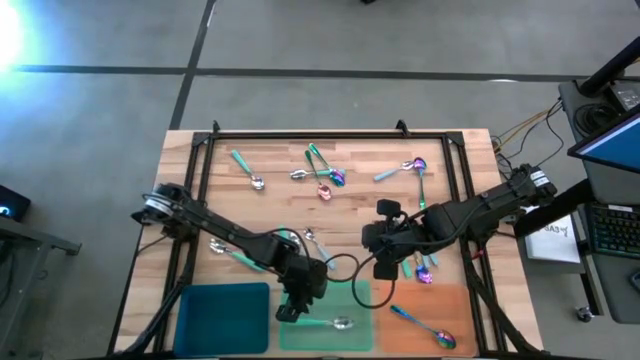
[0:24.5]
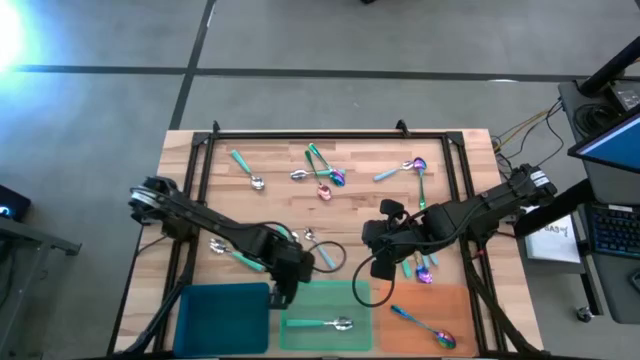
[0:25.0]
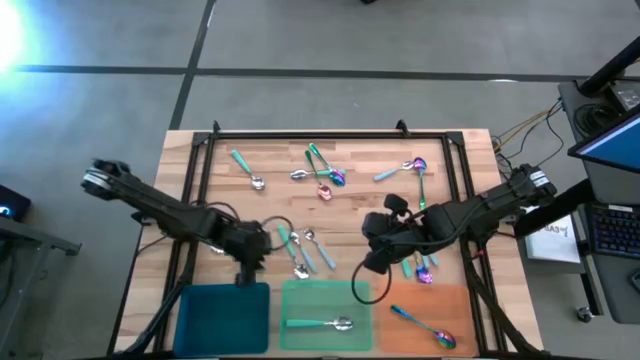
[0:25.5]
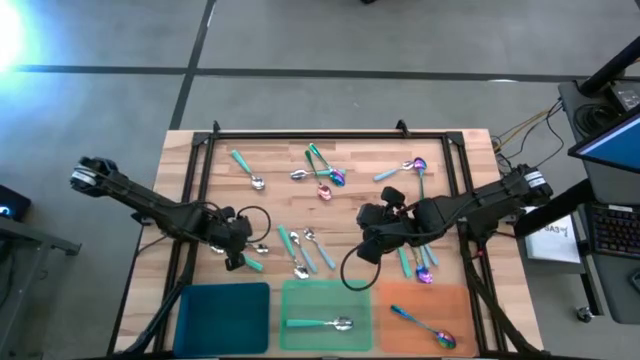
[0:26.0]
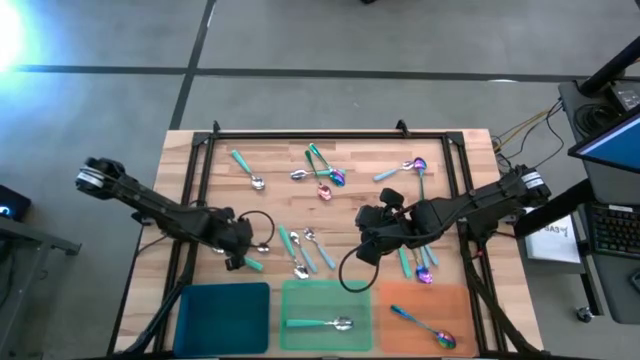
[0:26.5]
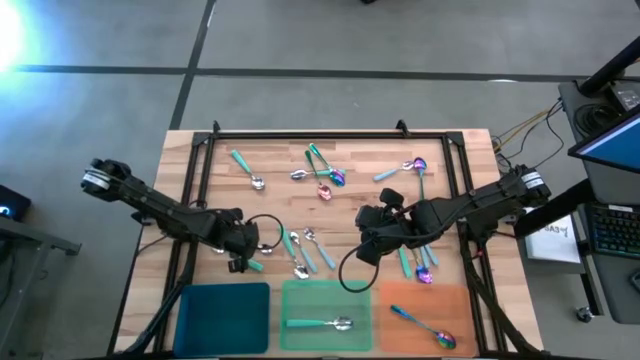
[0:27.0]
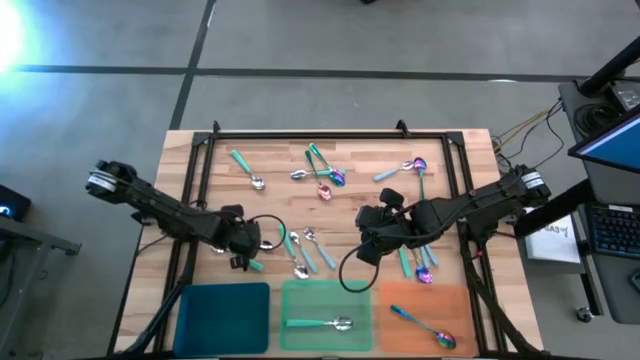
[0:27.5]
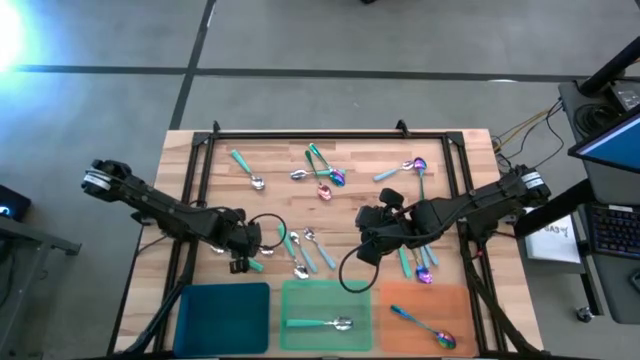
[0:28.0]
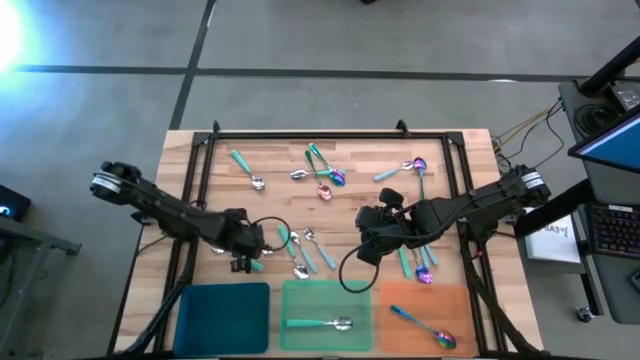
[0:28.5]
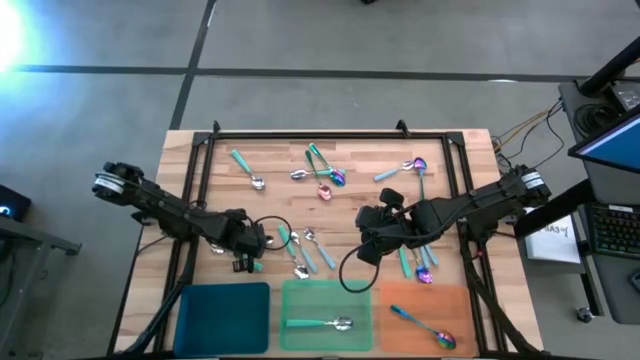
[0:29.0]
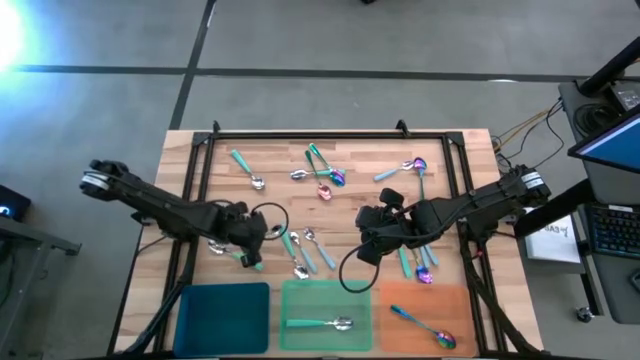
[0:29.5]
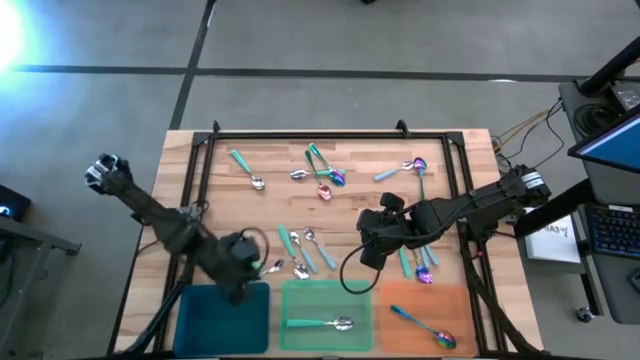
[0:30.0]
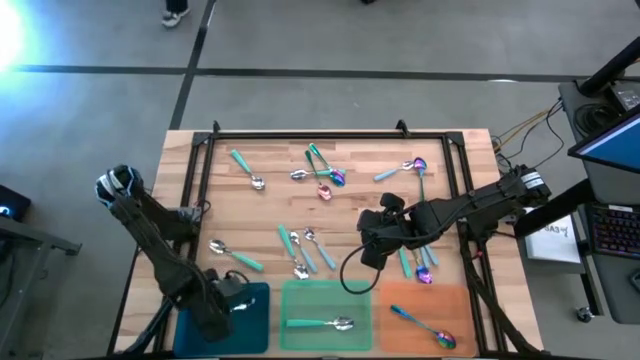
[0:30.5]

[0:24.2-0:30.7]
Task: Sort silverware by color (type)
Put the light blue spoon into the blue bin

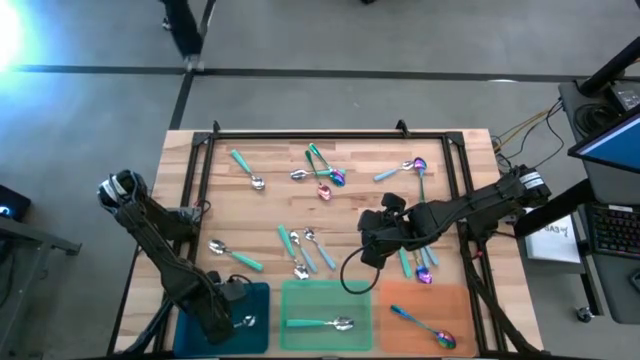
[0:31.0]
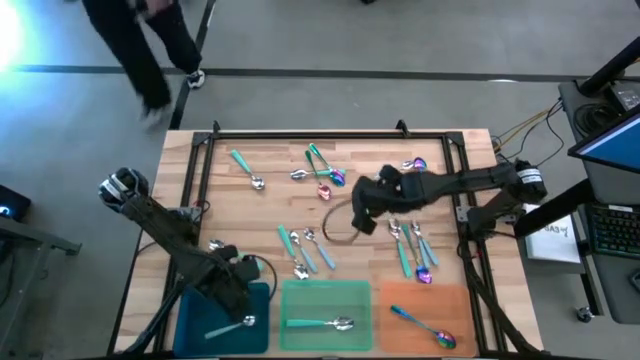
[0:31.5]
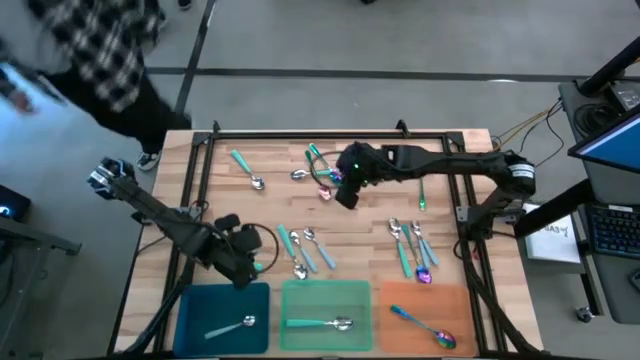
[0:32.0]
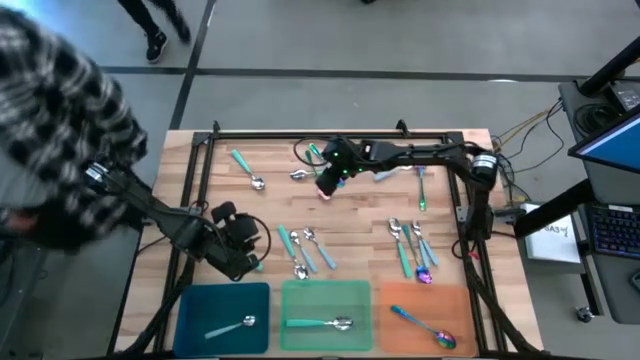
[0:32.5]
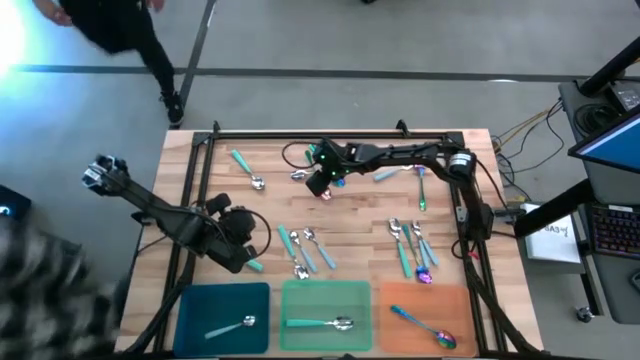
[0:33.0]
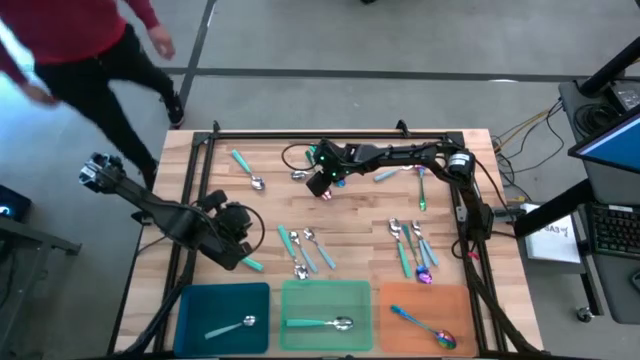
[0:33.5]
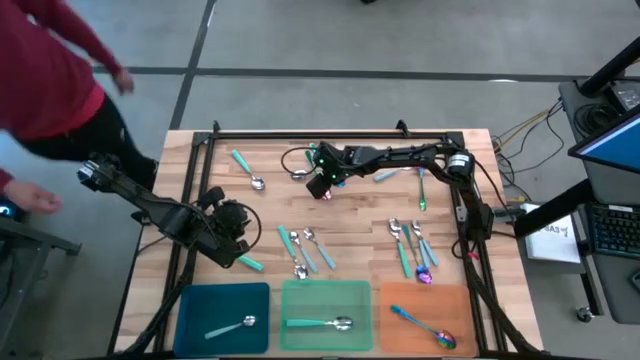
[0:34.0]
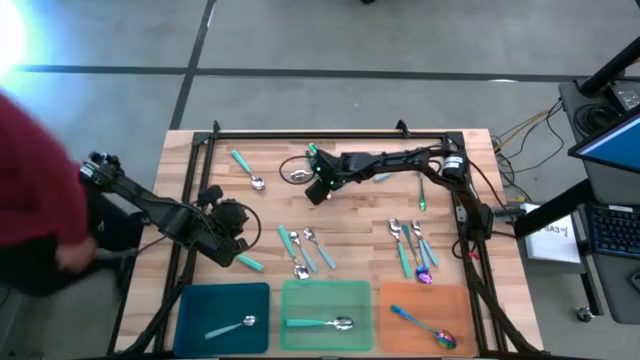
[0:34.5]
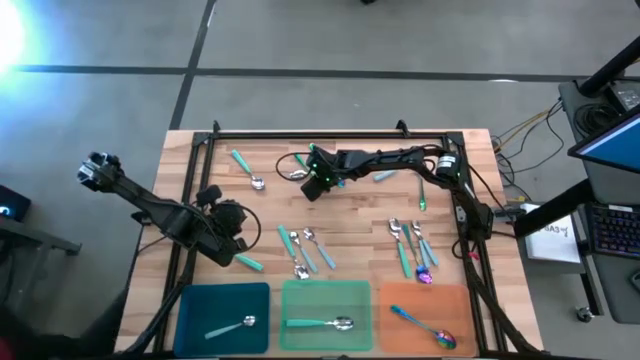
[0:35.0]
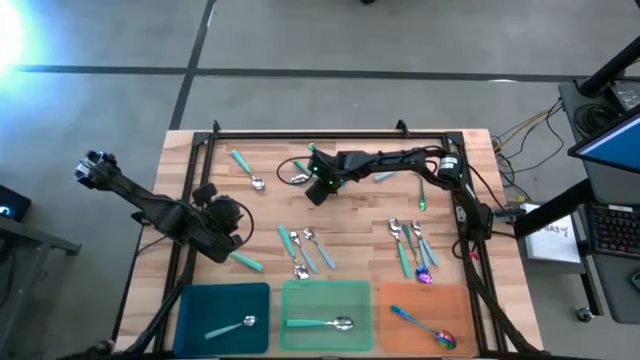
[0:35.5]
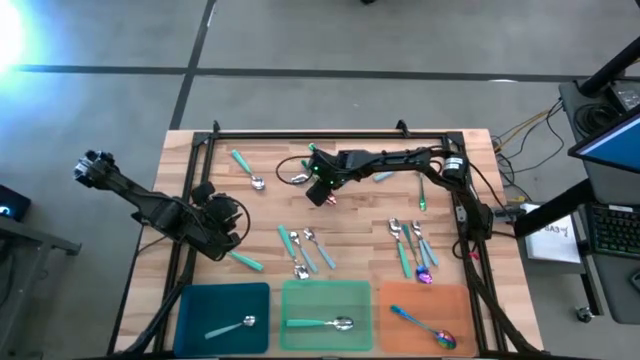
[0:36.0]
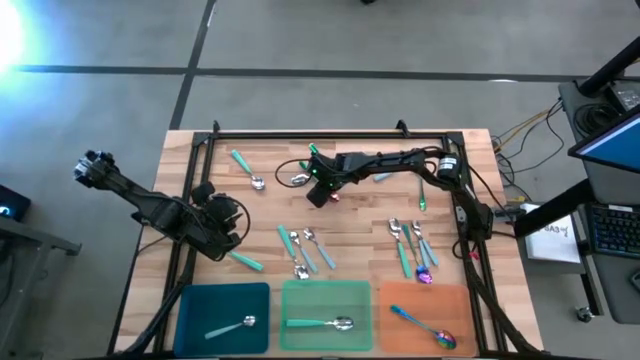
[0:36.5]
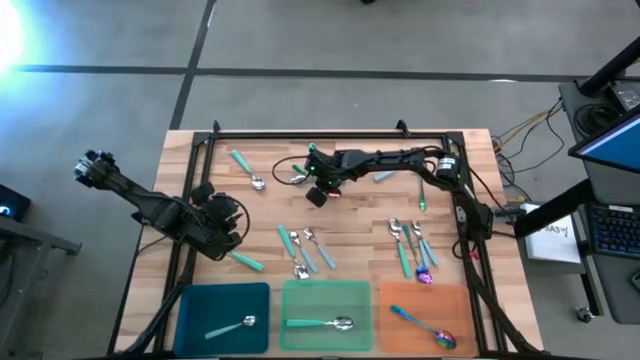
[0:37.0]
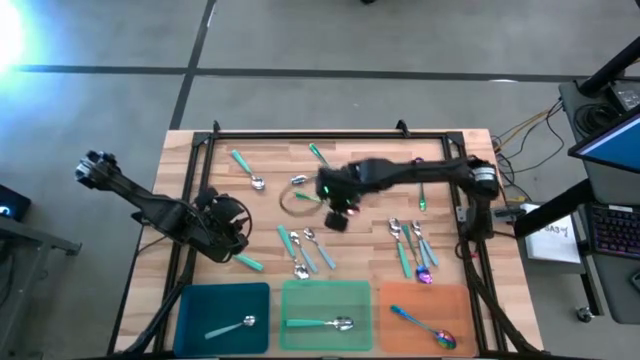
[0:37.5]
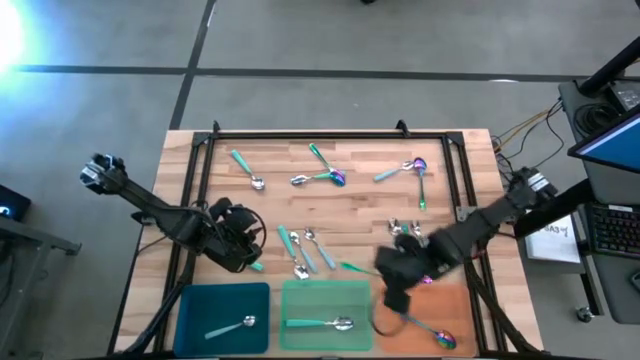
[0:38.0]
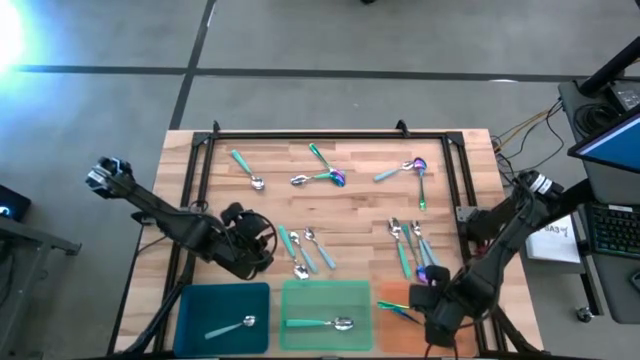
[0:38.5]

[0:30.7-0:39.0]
Put the blue spoon into the orange bin

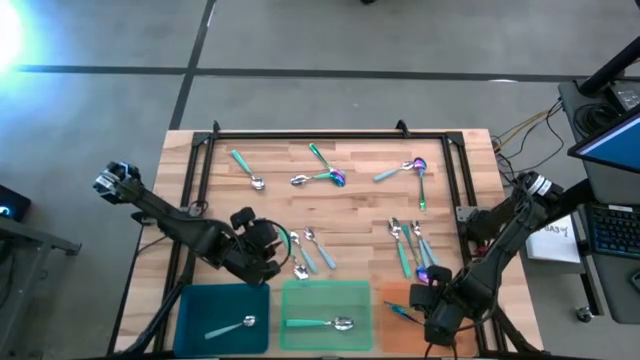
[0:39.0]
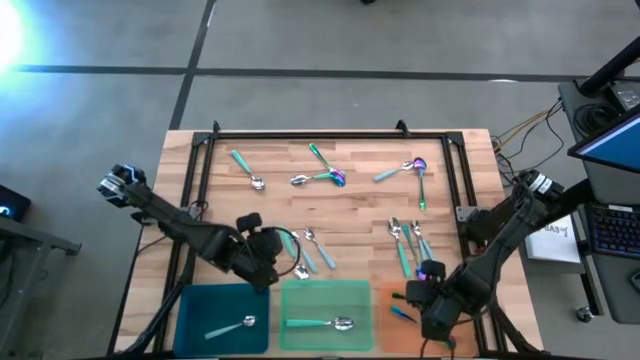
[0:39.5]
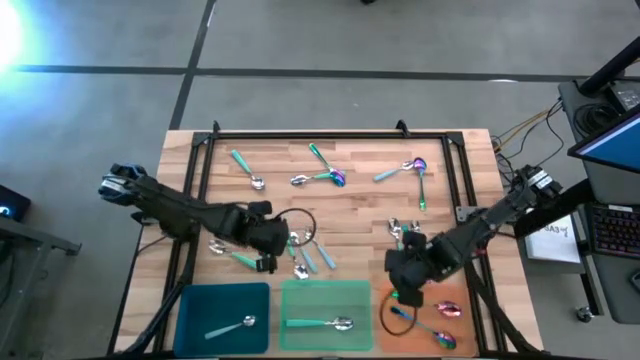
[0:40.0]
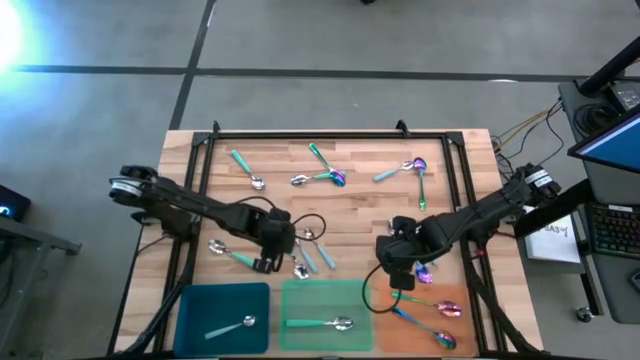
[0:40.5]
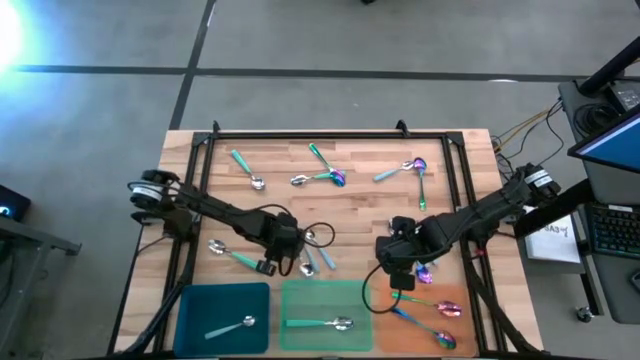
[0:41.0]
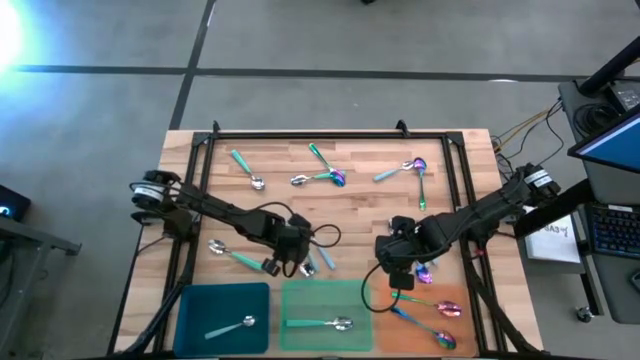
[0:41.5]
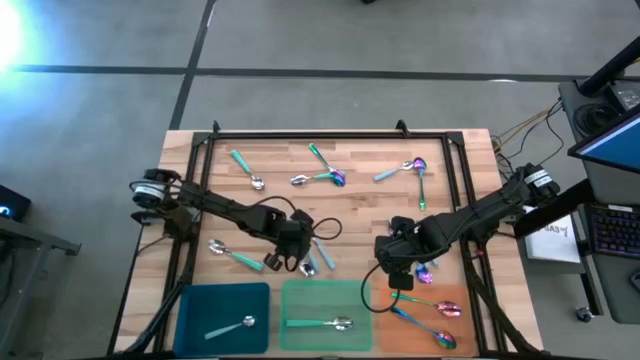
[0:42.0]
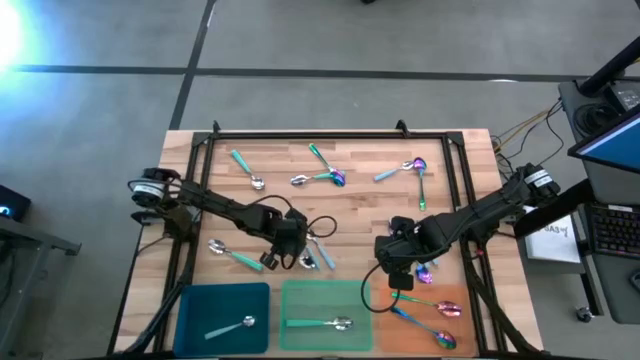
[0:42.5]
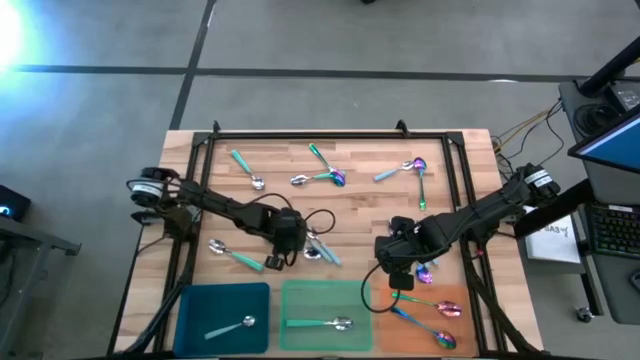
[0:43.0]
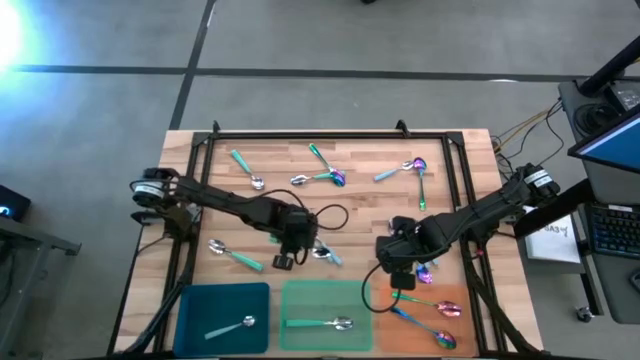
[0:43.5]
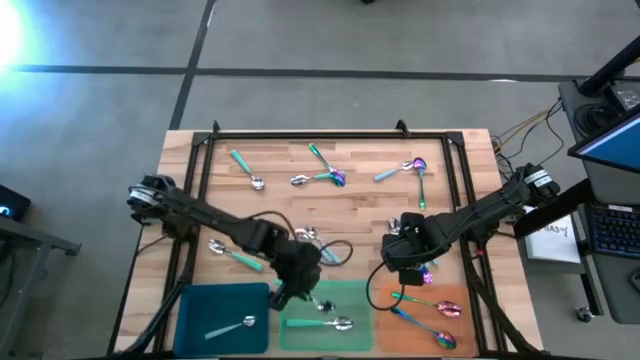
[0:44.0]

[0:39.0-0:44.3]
Put the light green spoon into the light green bin
